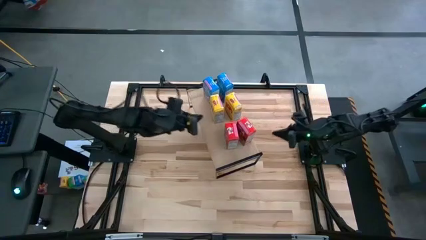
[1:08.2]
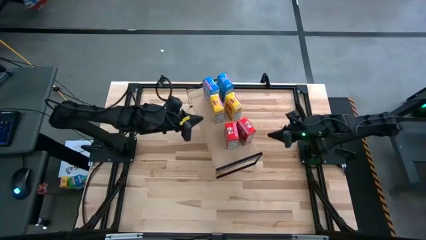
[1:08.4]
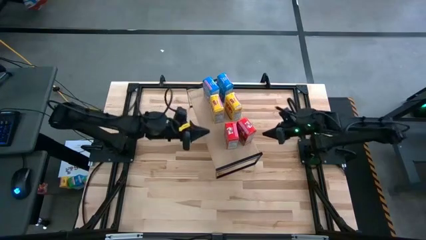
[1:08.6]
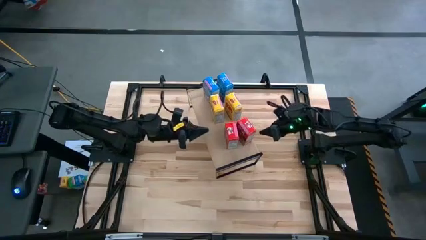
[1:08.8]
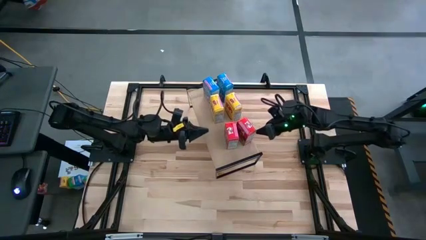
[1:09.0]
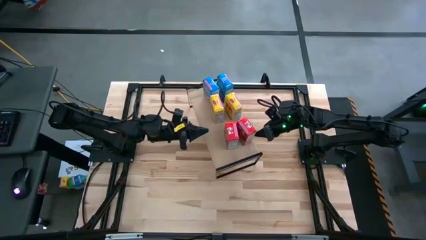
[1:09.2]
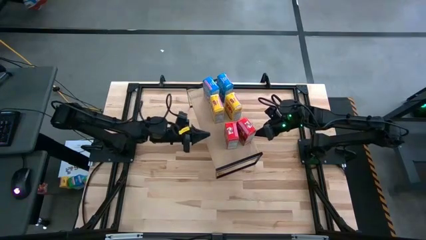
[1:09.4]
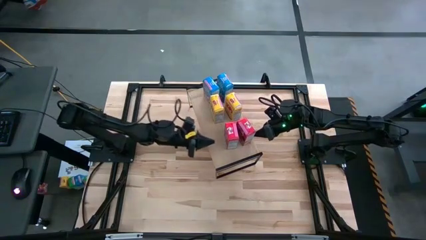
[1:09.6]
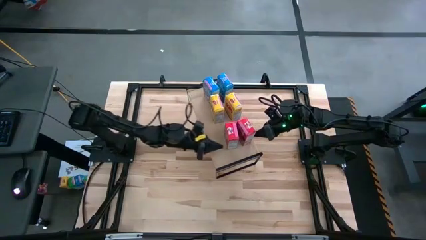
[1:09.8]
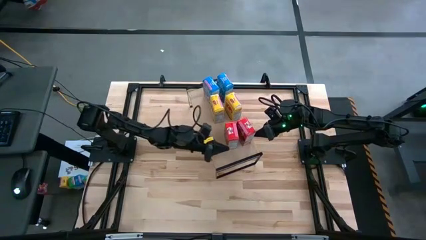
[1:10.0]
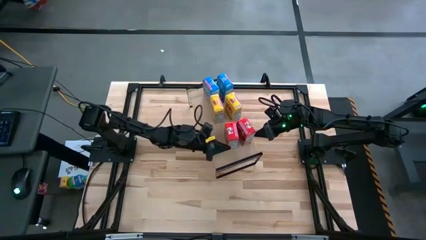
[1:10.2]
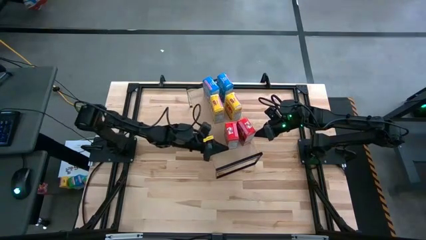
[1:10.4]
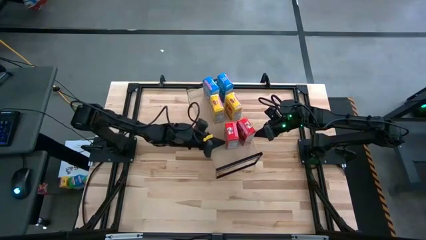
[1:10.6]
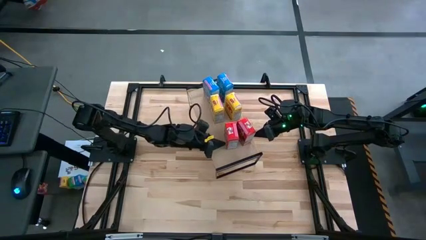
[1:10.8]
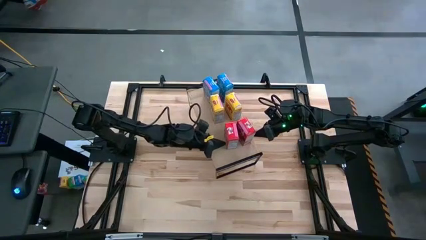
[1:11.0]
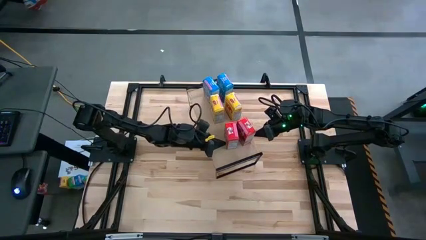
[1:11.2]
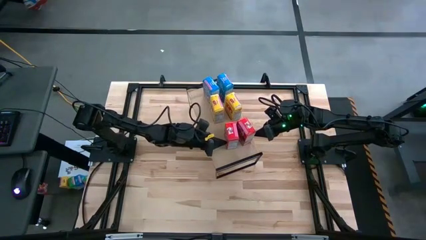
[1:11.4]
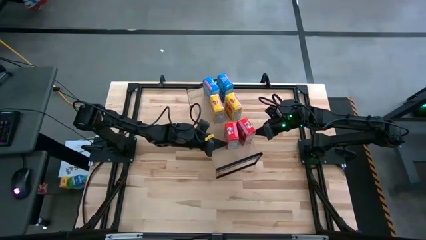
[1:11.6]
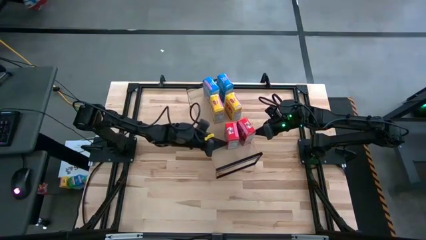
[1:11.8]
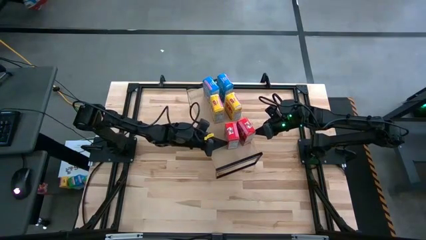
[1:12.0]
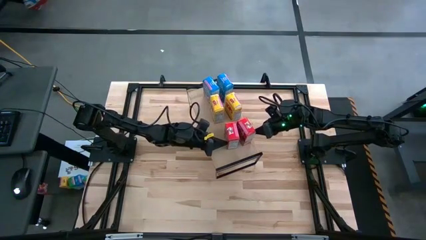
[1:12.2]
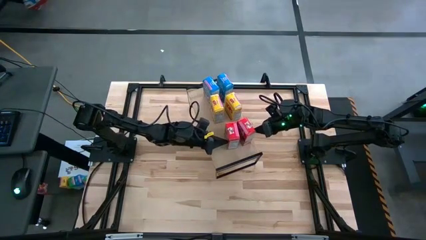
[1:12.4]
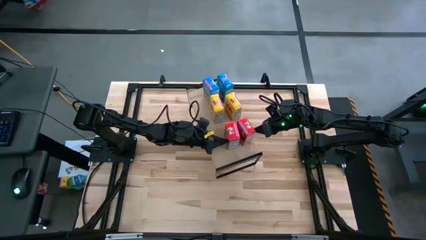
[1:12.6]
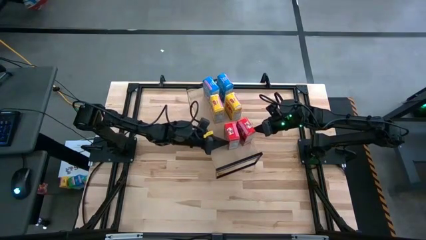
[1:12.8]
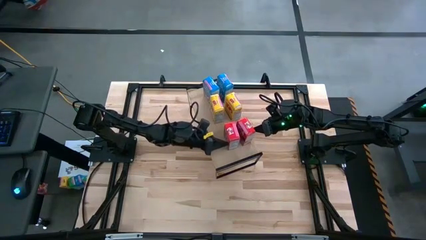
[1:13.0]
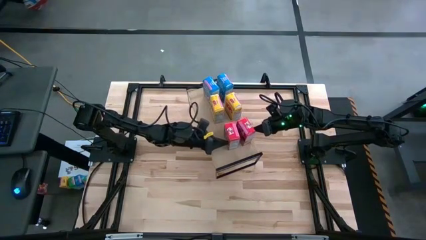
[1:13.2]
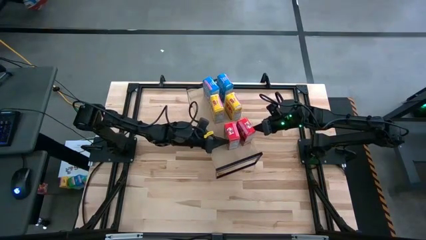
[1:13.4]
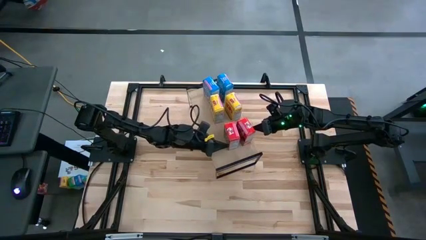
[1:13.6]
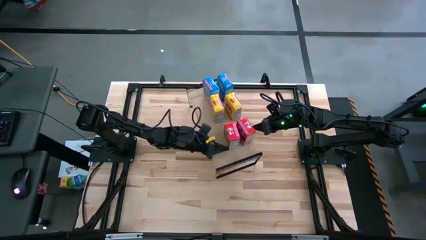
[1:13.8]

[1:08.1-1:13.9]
Task: Stack cereal on shelf
Adjust the red cereal boxes on the shelf

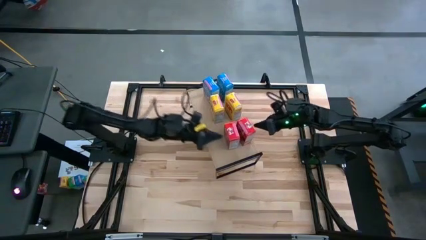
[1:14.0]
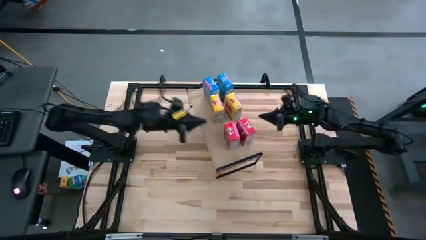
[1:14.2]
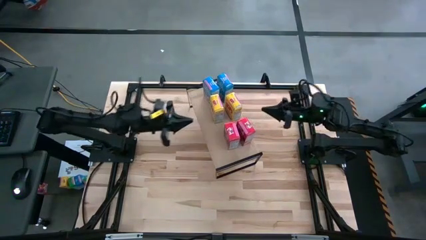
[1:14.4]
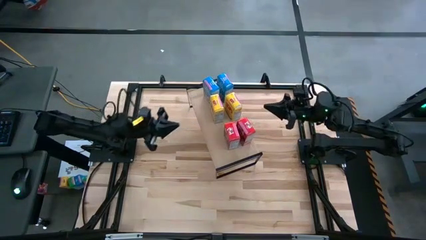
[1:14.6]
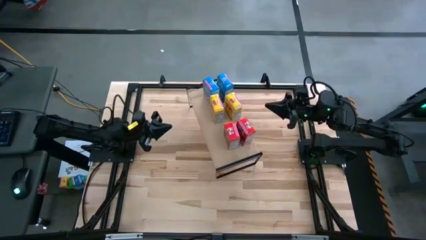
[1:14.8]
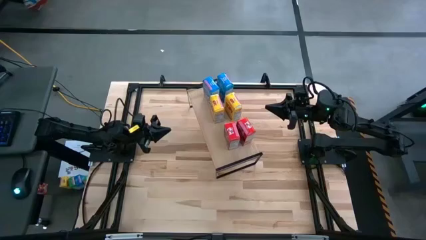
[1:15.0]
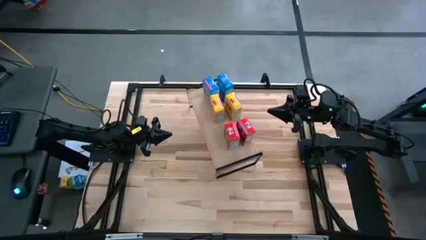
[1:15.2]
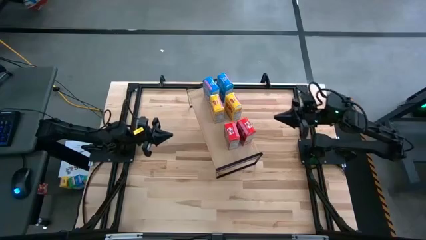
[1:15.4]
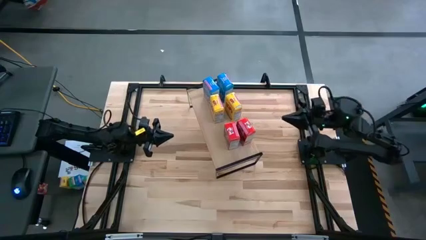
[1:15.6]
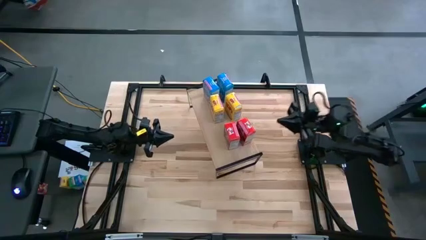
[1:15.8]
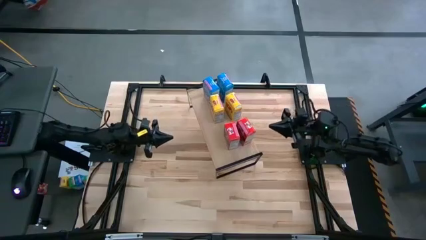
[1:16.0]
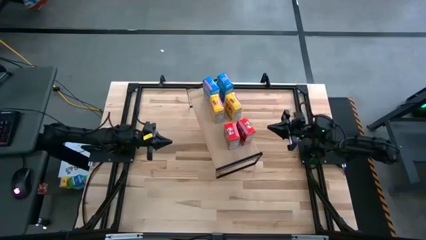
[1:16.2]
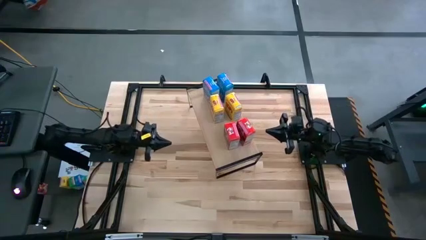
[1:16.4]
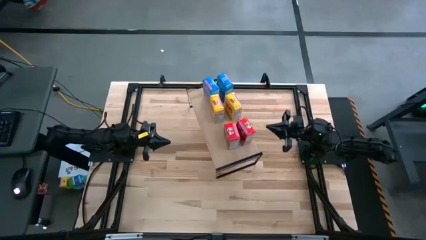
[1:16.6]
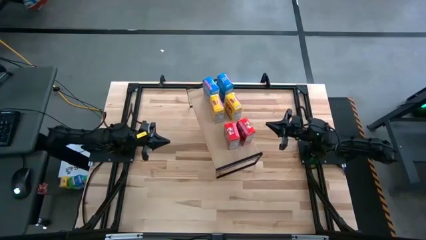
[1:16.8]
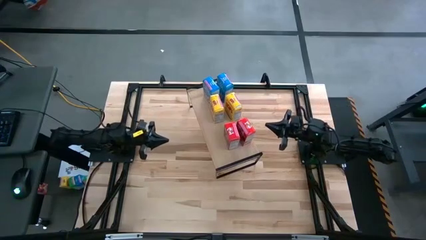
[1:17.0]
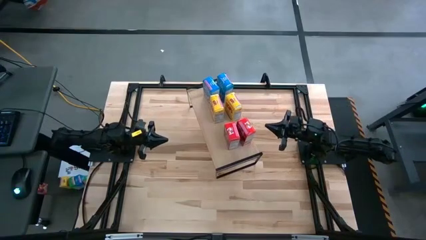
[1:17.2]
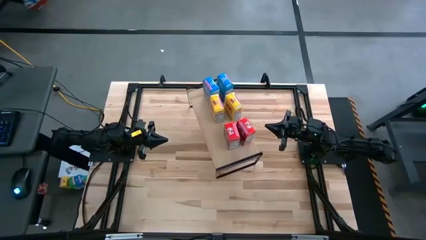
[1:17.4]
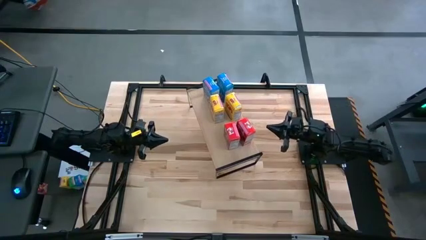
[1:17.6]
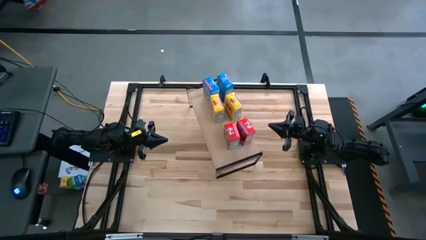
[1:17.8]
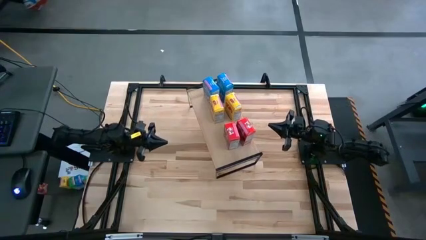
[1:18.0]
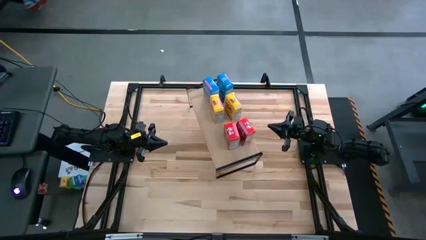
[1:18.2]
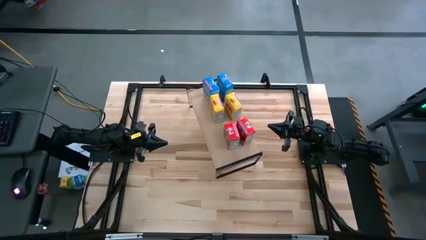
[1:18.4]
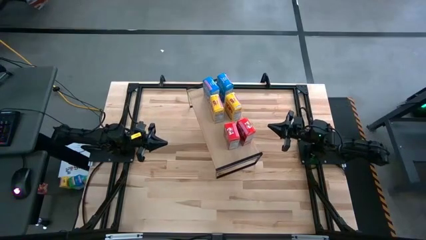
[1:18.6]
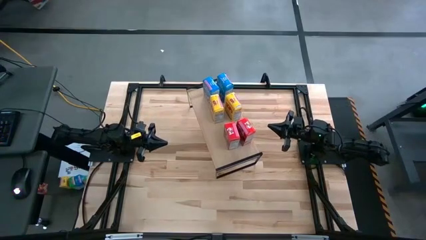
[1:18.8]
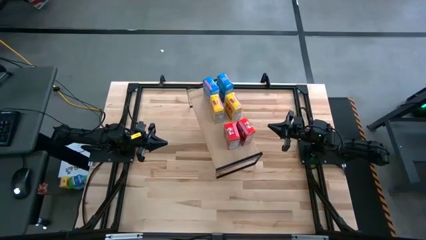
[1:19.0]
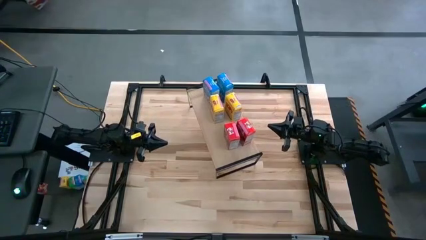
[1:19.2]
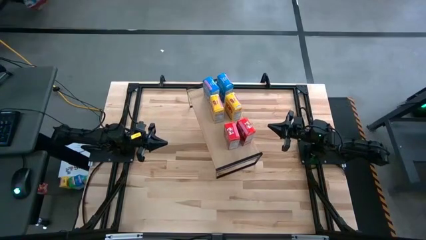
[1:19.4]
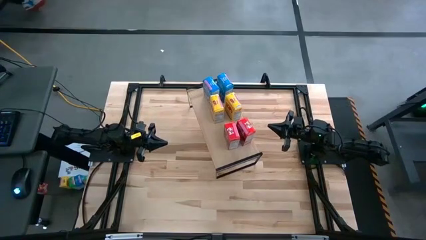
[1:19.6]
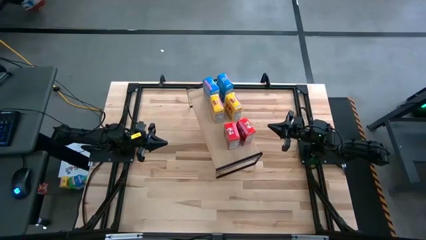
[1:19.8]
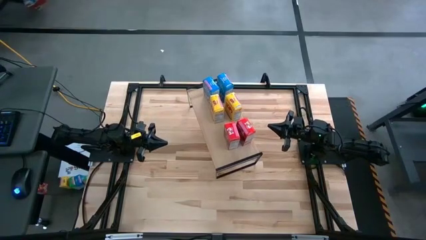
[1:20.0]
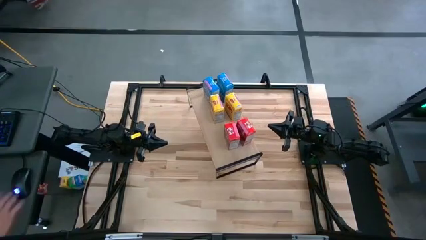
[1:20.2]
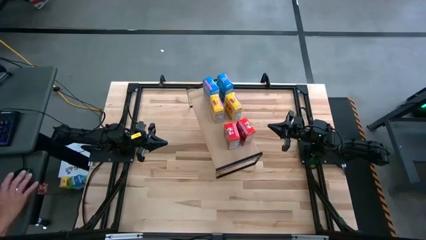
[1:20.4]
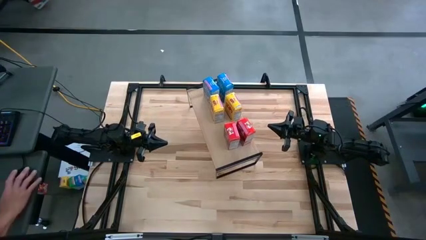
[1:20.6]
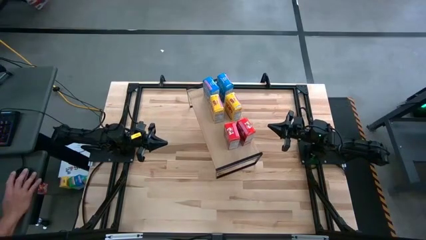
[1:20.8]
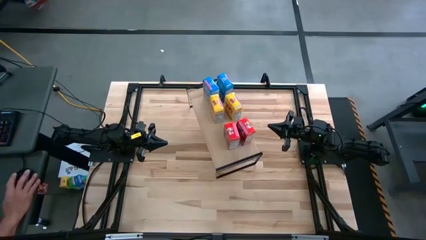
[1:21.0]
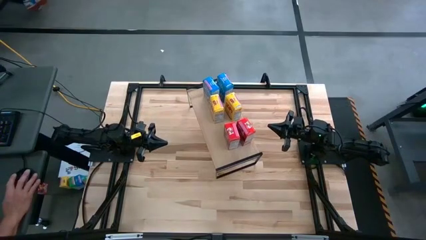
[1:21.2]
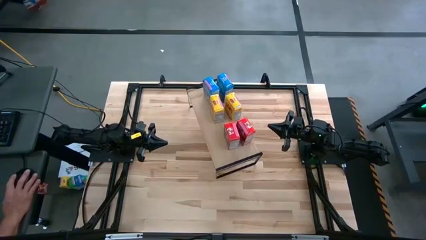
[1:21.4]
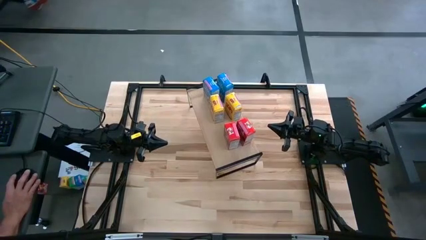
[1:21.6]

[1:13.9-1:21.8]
Return to Home Position

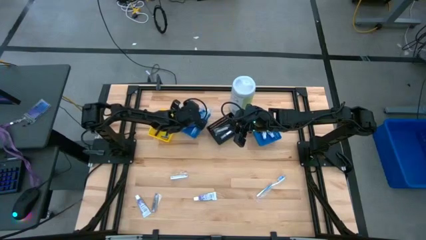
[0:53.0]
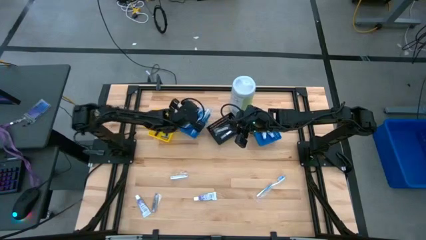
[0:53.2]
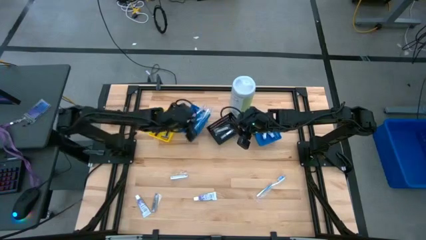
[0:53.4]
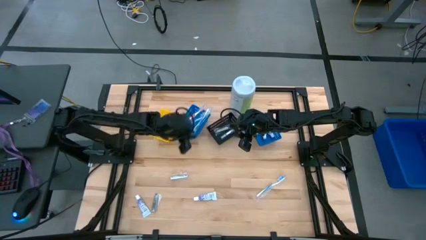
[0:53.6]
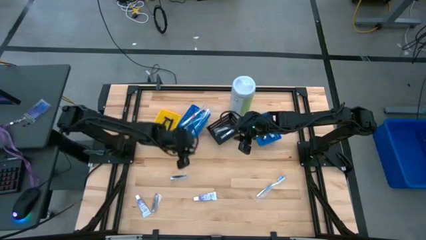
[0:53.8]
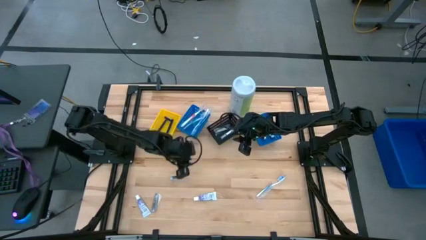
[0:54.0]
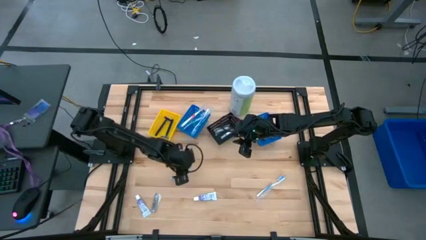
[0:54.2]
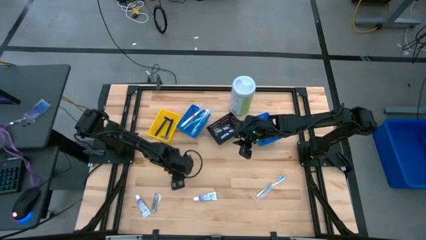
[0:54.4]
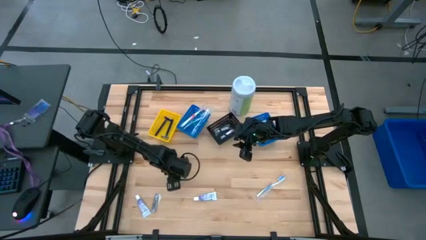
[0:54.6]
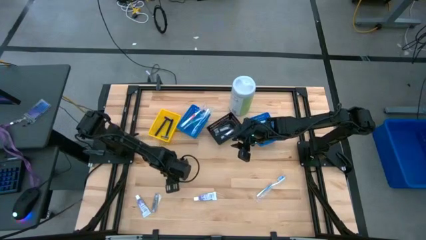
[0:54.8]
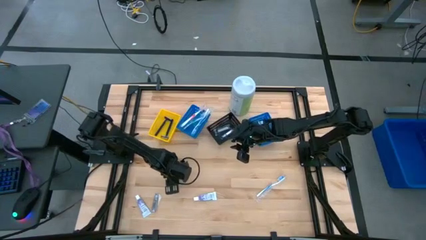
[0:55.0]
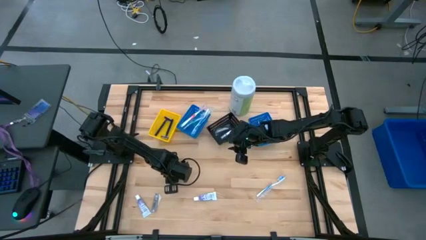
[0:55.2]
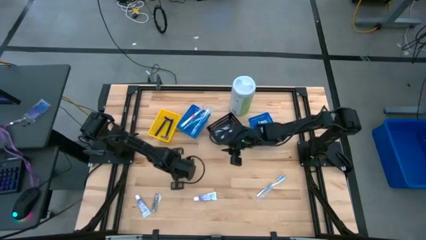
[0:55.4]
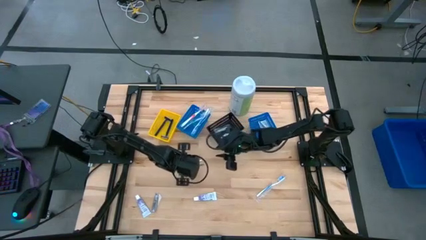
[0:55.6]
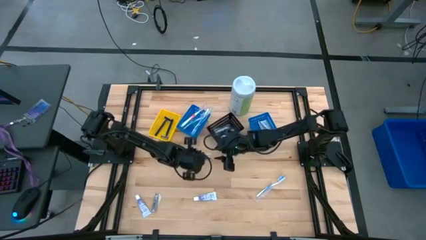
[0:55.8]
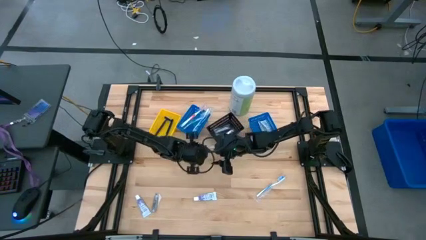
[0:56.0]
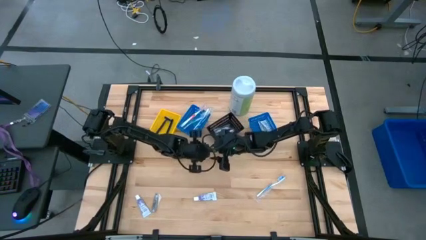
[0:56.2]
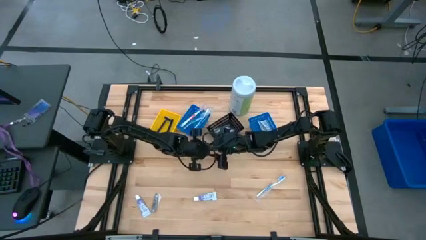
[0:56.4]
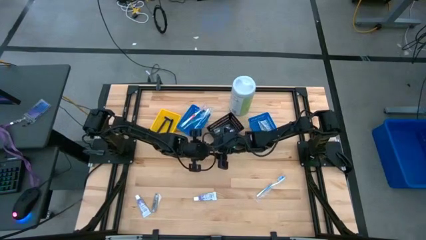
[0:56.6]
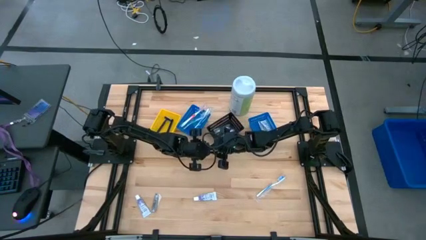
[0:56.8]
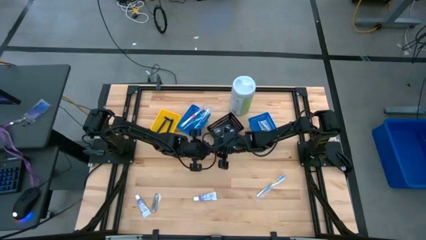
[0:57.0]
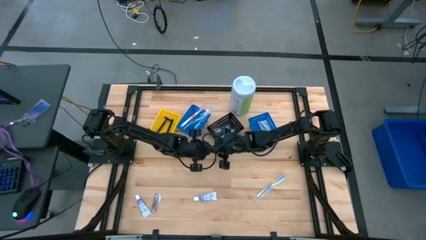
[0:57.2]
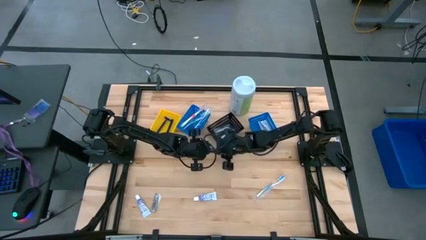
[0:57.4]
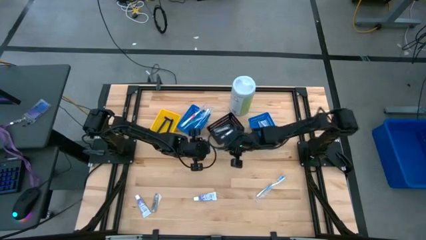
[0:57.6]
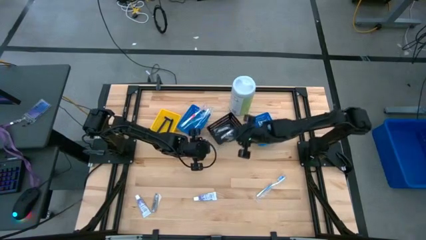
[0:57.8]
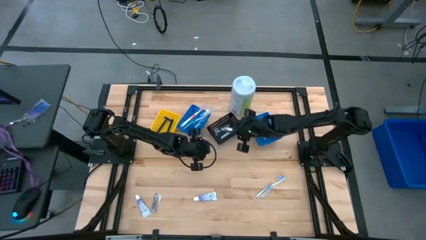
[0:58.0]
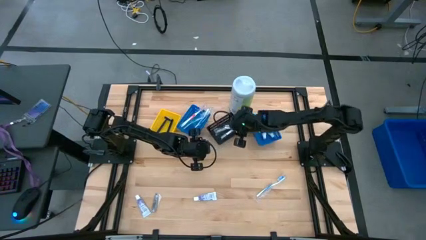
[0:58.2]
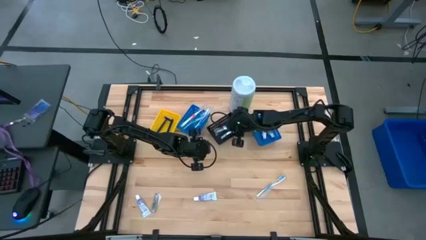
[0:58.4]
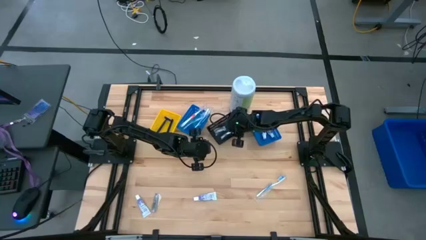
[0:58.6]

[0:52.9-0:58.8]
Task: Pick & Place Travel size toiletries
Put the silver nail cutter into the black basket
